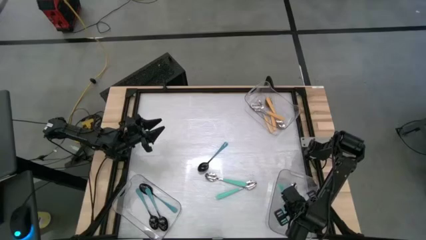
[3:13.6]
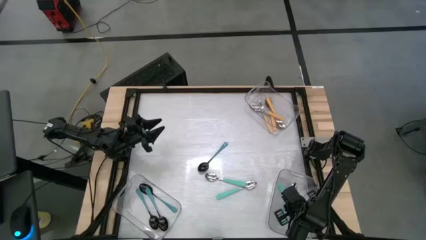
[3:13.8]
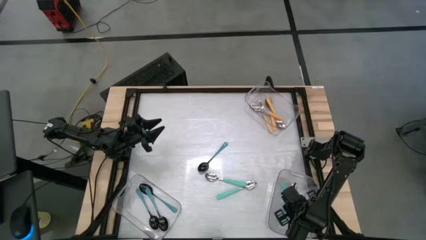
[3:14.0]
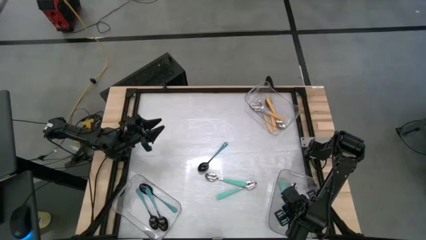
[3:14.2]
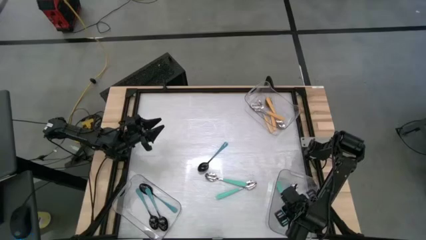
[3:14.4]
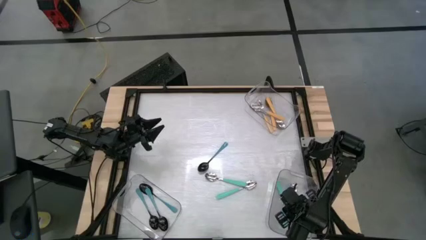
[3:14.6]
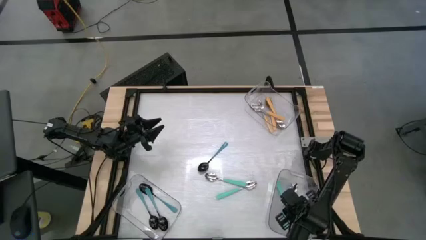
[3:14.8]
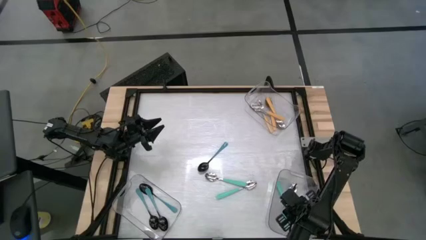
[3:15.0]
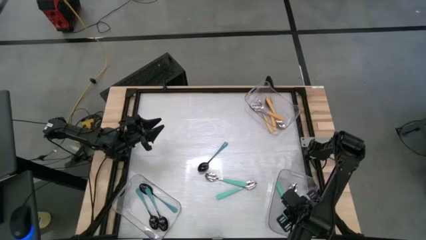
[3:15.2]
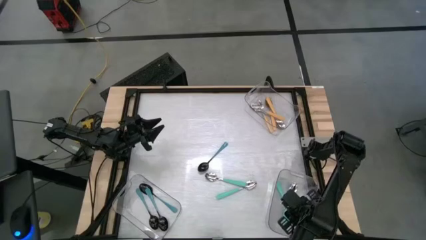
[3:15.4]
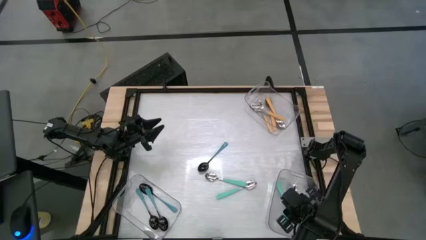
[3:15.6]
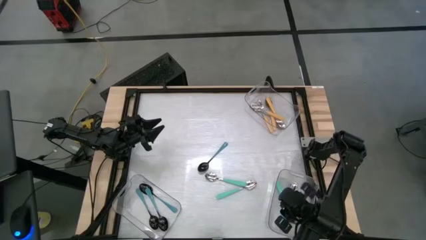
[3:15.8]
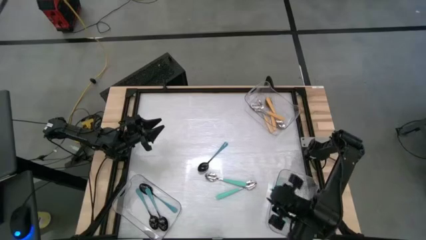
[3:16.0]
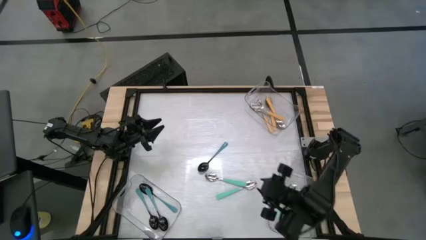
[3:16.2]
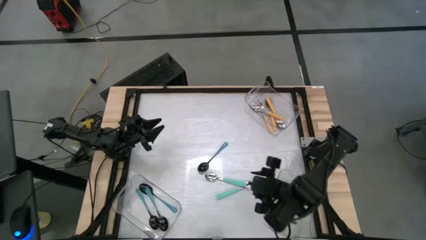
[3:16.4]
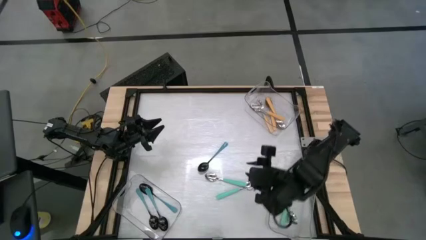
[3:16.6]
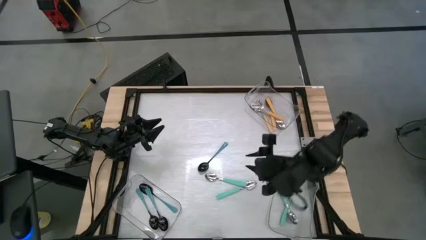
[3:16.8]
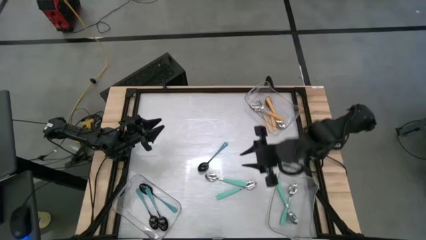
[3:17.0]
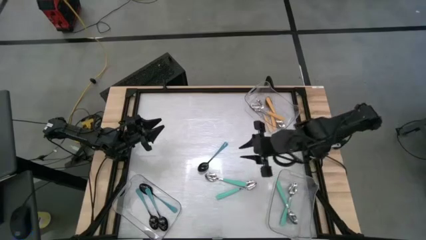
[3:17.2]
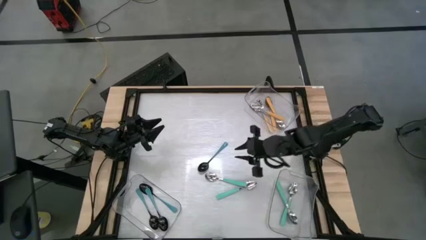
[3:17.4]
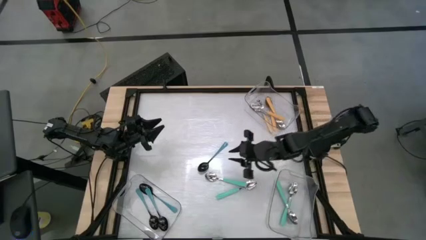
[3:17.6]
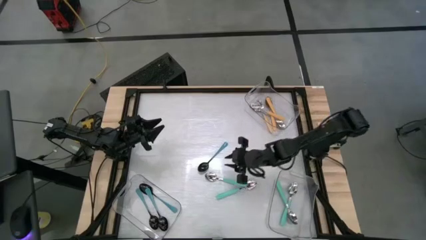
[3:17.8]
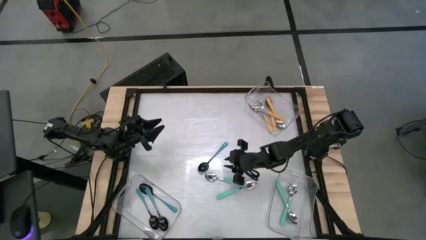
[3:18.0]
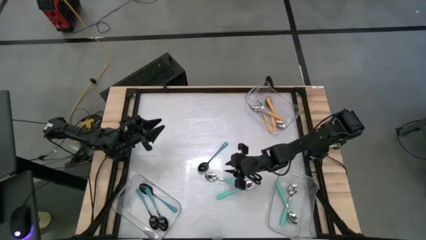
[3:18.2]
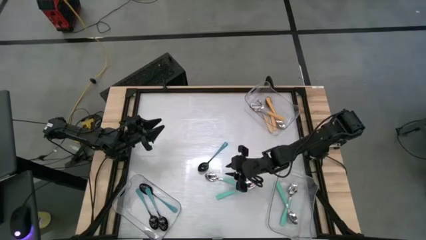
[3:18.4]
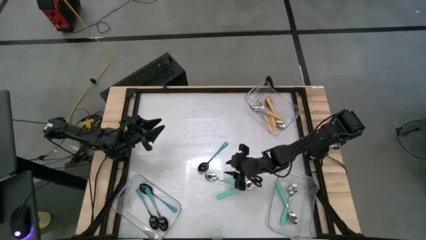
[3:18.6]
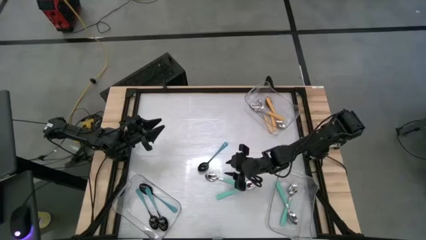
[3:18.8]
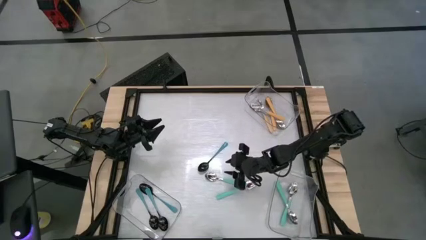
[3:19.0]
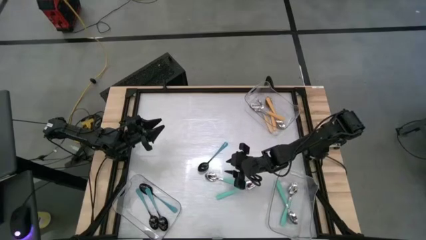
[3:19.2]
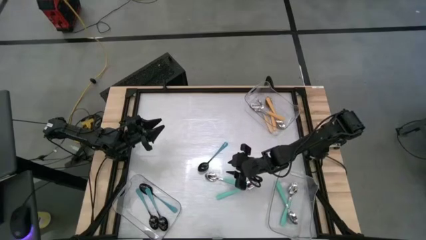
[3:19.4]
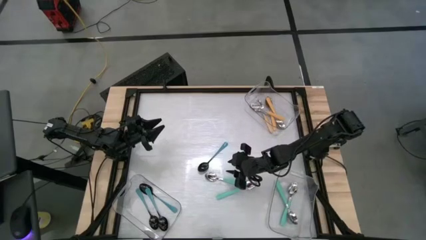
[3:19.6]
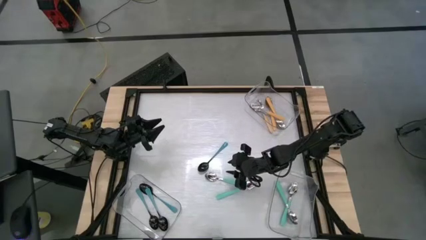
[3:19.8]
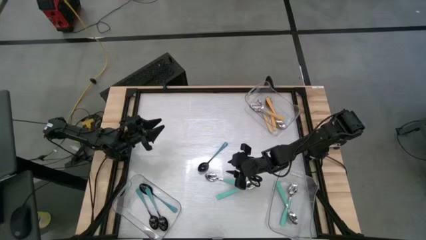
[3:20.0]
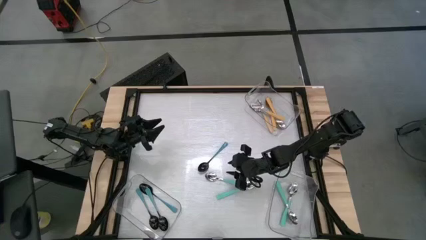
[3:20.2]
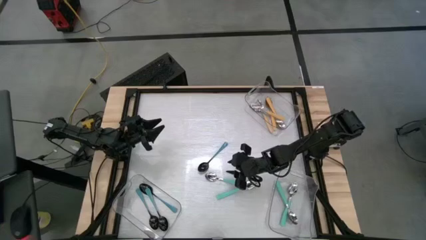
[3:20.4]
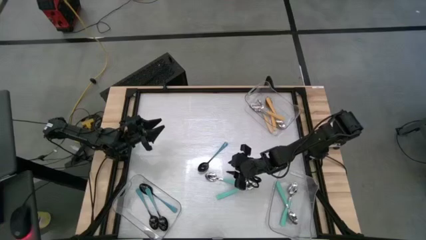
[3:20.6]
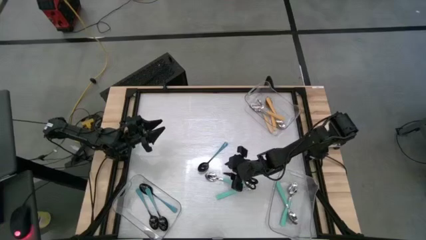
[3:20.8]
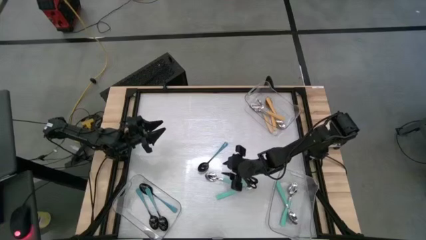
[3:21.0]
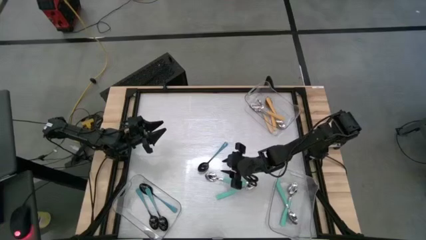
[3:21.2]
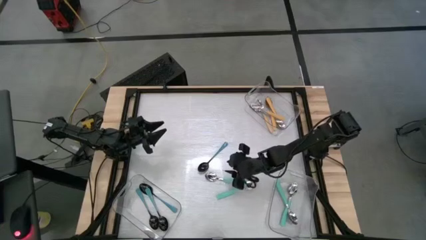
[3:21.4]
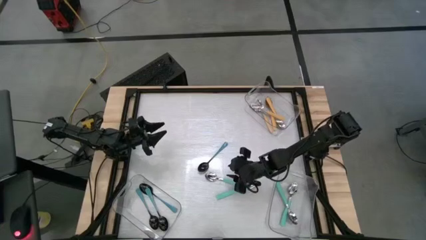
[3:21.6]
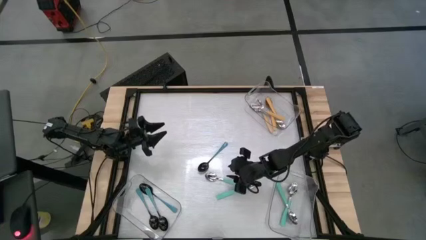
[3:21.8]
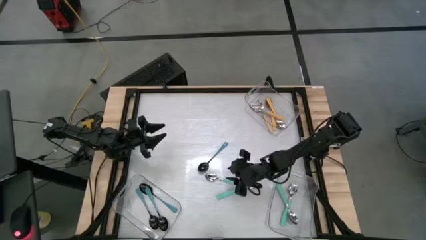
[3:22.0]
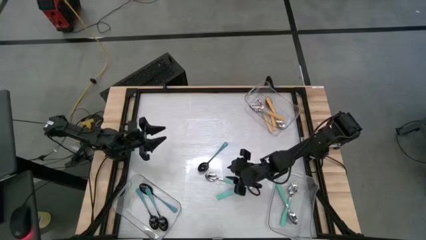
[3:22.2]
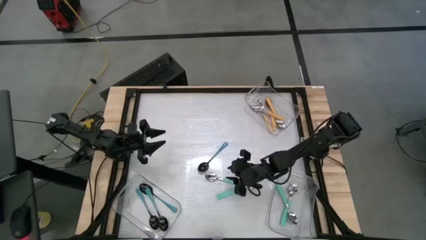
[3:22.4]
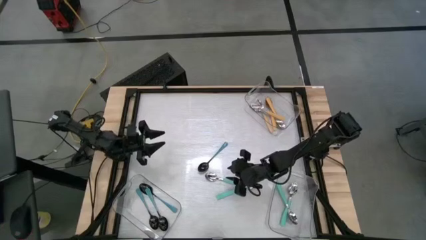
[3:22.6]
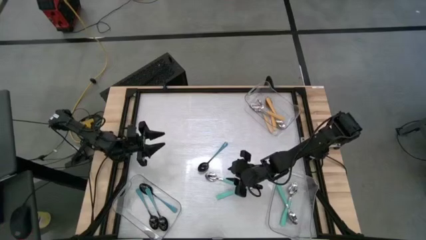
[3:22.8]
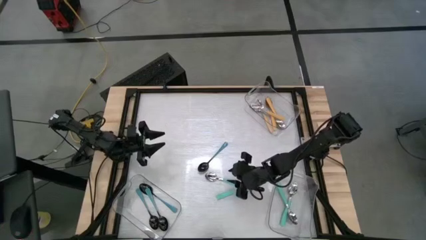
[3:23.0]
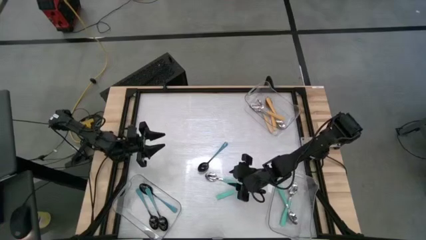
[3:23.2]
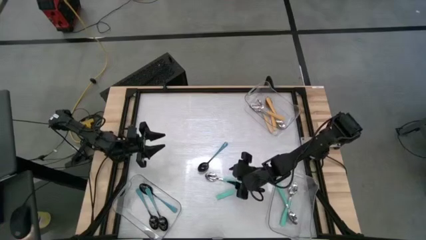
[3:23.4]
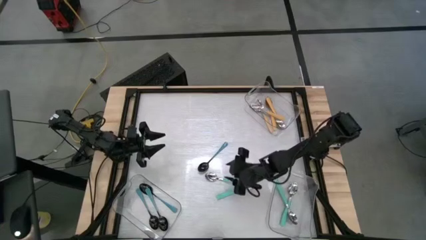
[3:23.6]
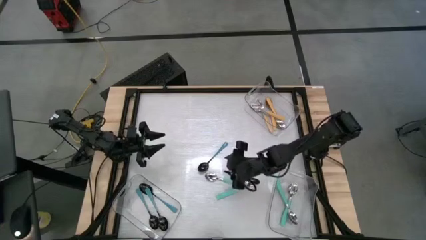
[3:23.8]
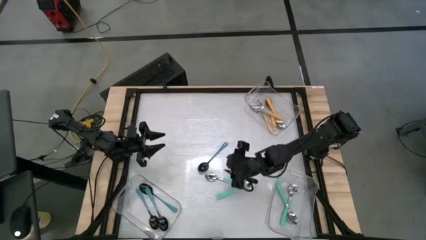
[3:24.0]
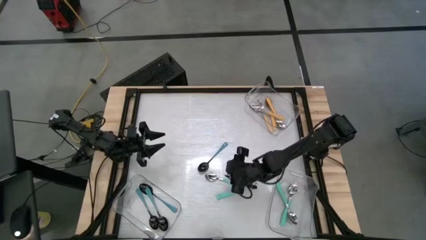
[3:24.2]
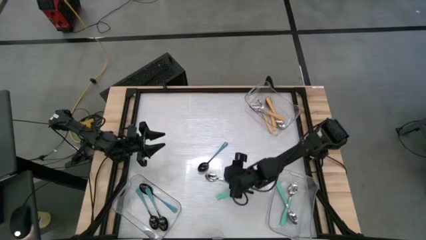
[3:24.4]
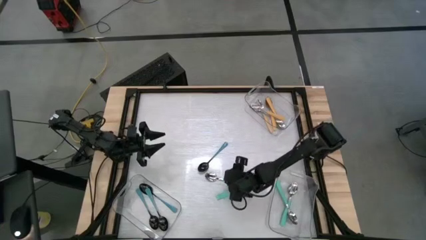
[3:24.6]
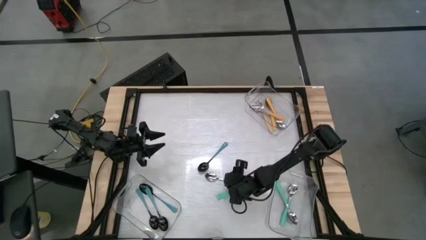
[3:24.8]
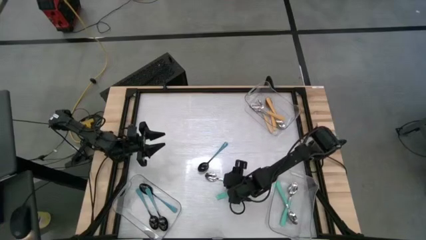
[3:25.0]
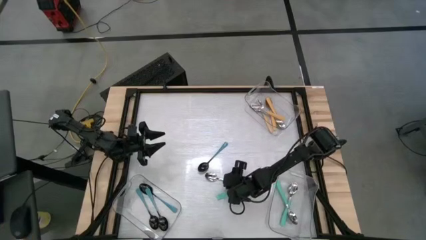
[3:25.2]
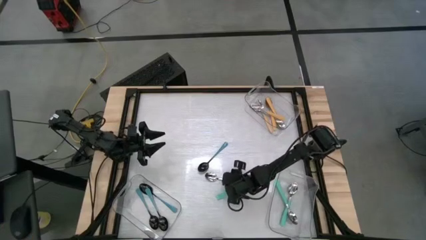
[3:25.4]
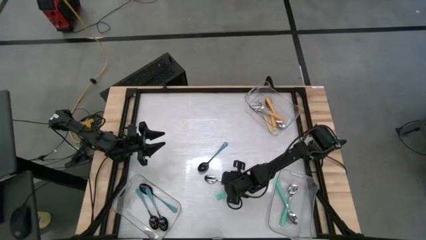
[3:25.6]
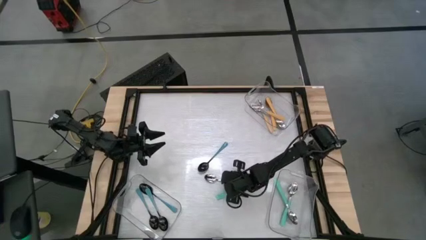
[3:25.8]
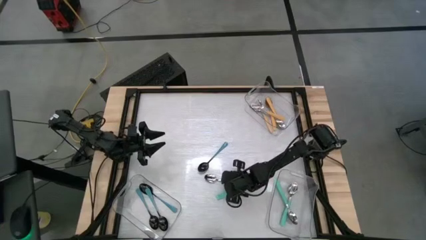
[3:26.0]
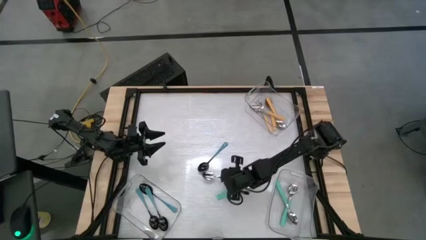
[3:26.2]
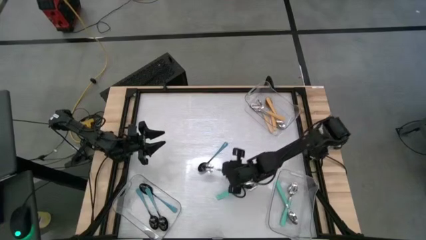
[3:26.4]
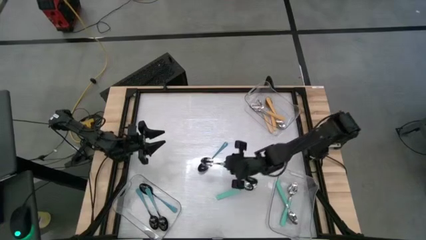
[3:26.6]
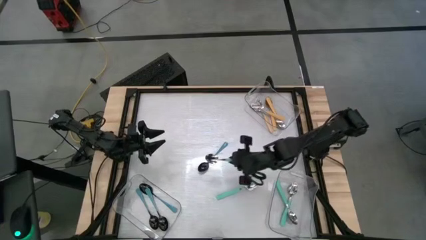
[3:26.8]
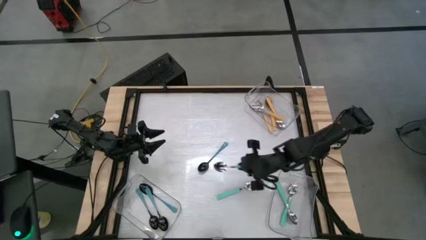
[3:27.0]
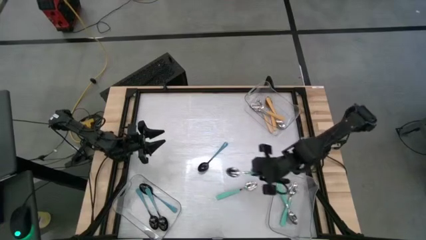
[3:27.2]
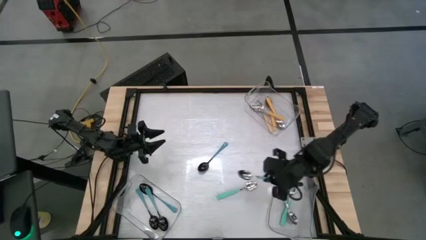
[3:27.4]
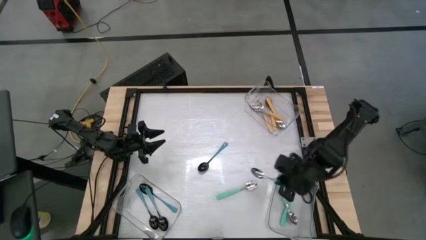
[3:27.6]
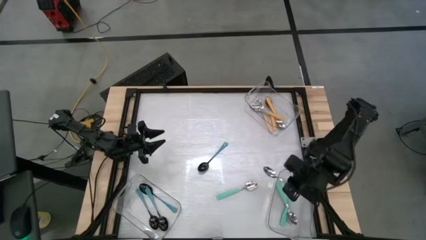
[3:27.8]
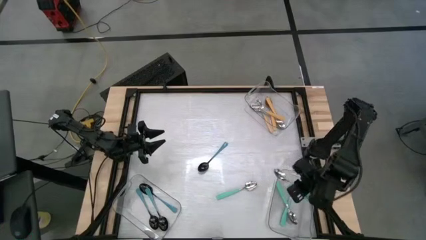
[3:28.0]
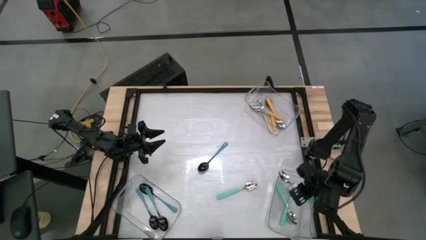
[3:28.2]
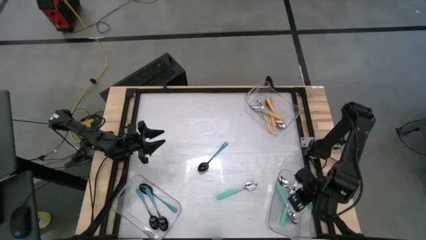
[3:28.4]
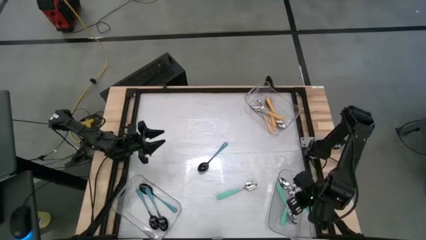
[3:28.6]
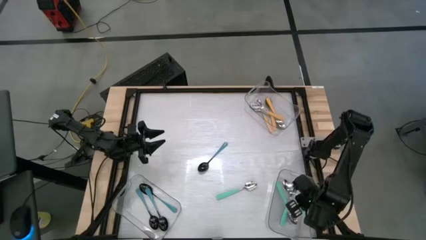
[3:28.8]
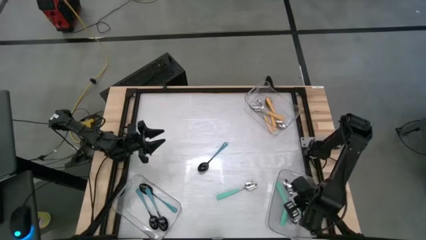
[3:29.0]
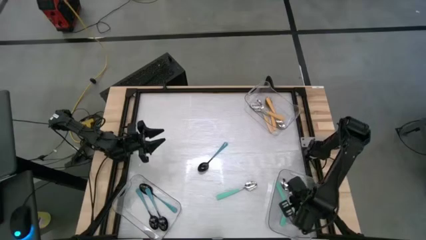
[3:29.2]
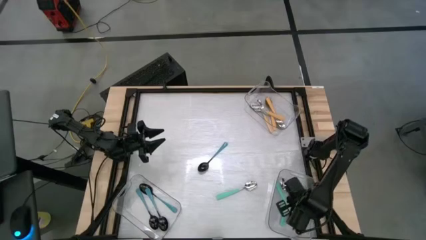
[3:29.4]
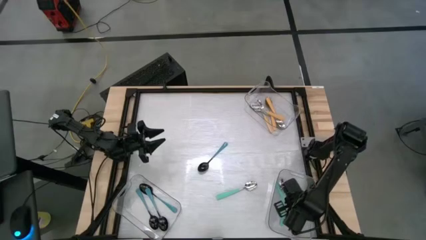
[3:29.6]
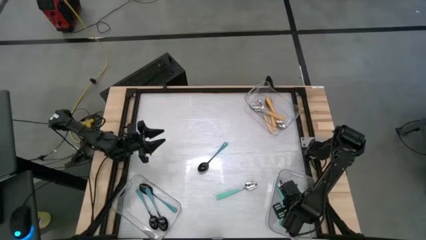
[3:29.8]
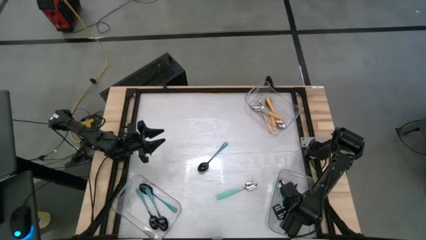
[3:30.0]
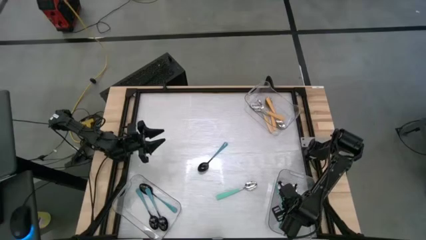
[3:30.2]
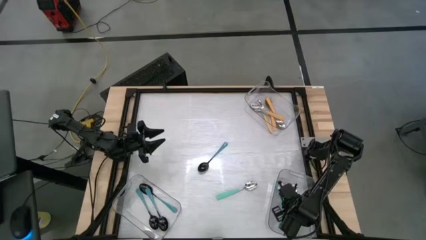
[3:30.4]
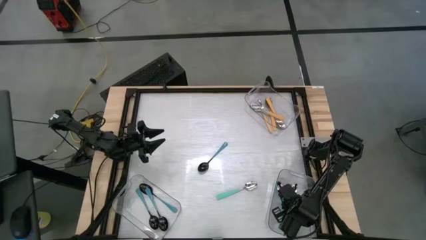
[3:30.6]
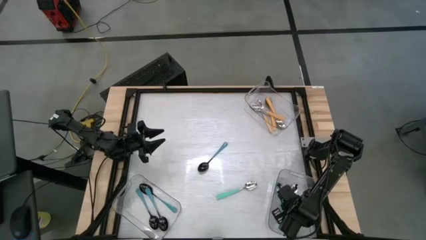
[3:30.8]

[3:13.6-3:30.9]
Task: Sort silverware by color (type)
Put the green spoon into the bottom right transparent bin
